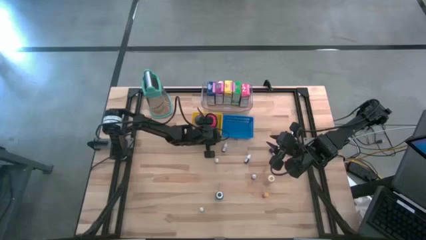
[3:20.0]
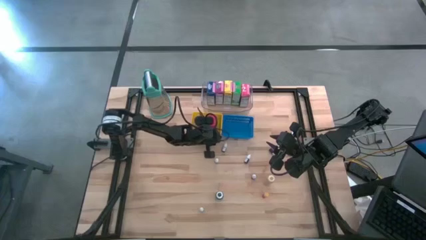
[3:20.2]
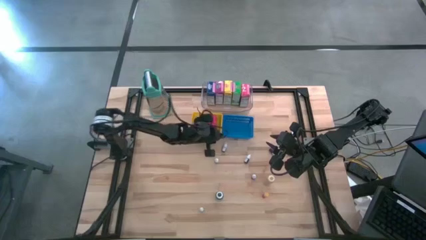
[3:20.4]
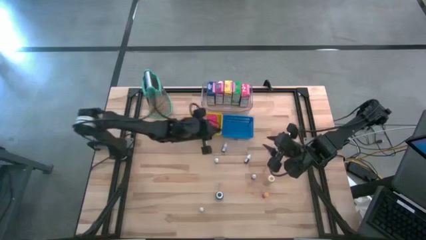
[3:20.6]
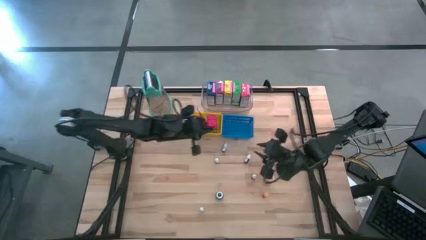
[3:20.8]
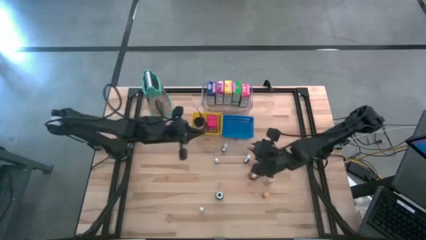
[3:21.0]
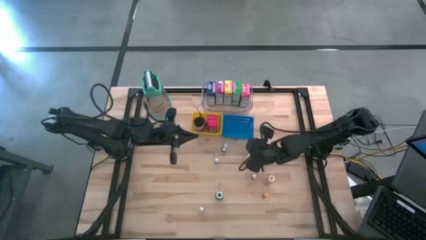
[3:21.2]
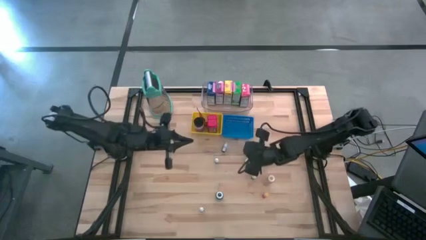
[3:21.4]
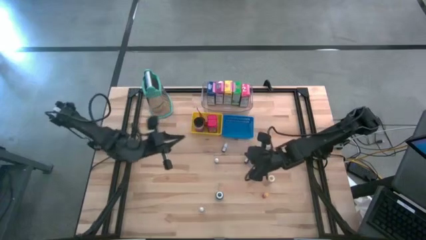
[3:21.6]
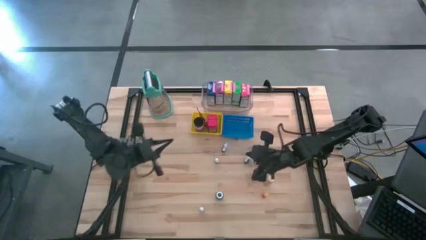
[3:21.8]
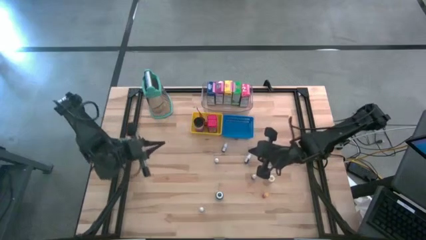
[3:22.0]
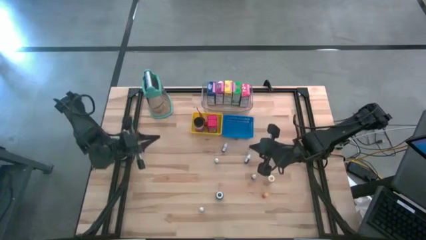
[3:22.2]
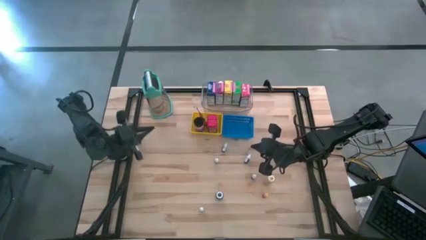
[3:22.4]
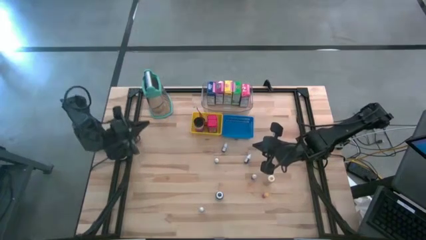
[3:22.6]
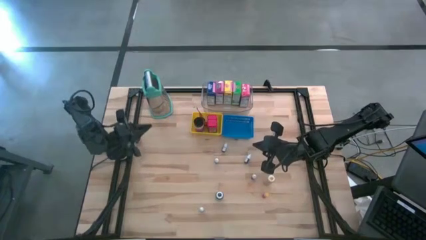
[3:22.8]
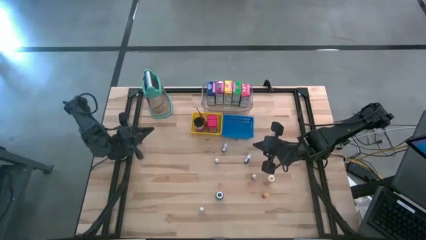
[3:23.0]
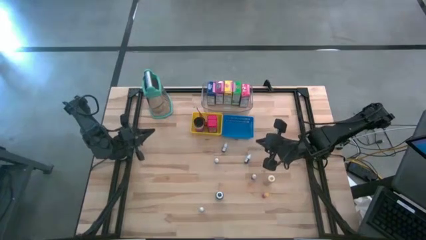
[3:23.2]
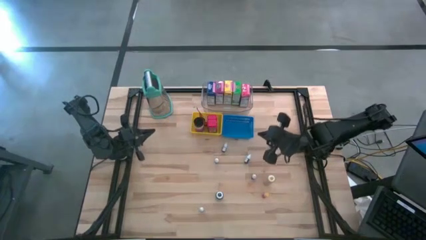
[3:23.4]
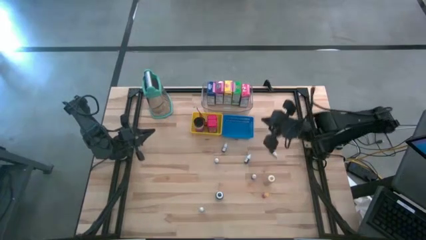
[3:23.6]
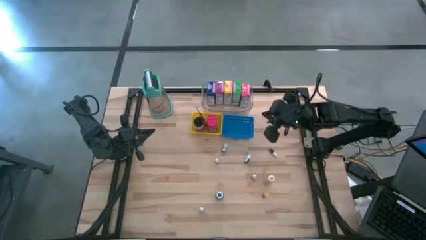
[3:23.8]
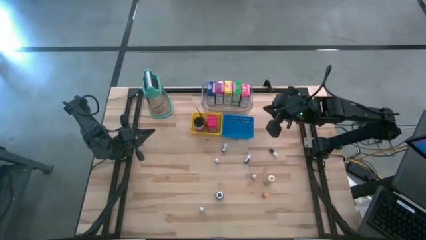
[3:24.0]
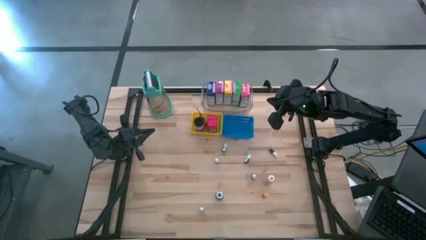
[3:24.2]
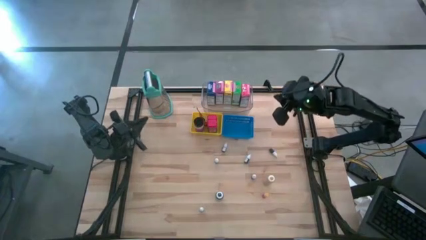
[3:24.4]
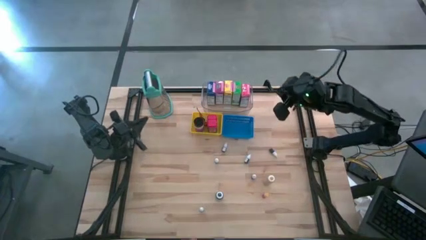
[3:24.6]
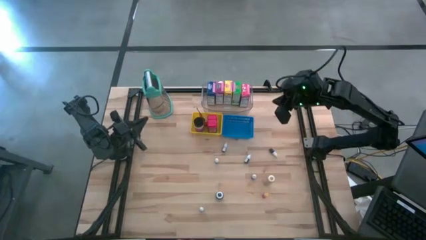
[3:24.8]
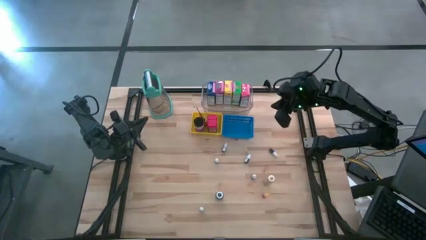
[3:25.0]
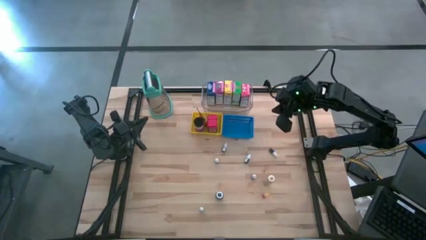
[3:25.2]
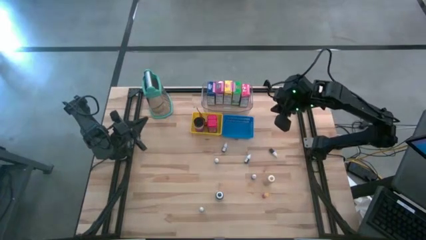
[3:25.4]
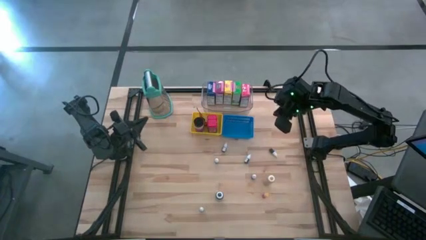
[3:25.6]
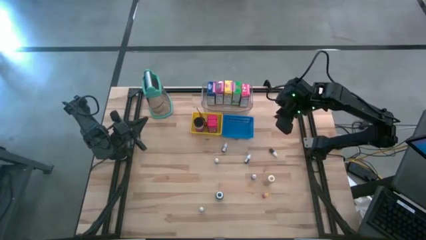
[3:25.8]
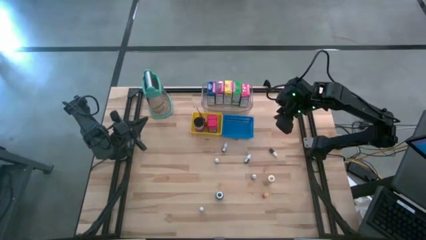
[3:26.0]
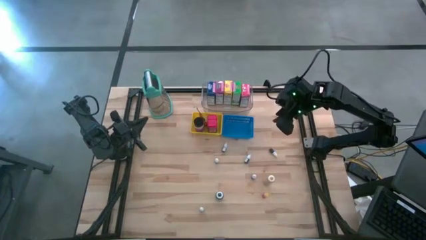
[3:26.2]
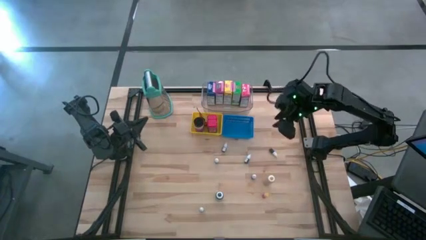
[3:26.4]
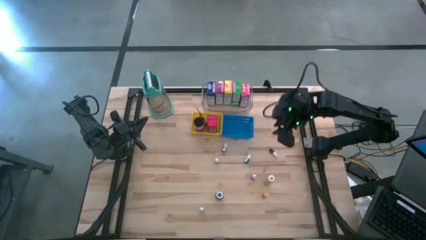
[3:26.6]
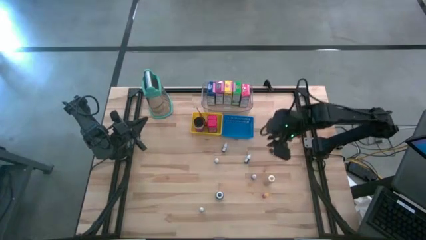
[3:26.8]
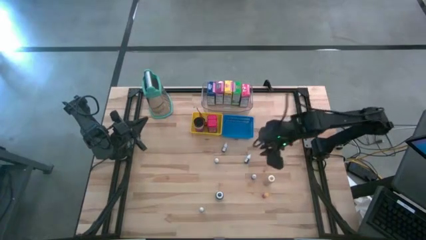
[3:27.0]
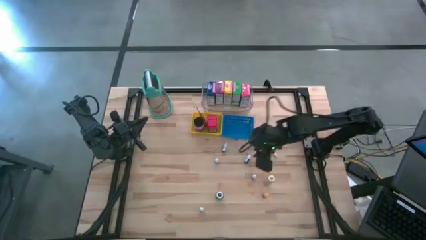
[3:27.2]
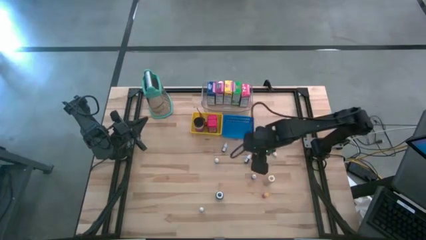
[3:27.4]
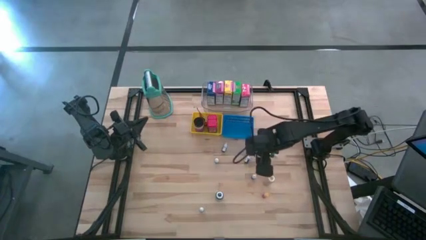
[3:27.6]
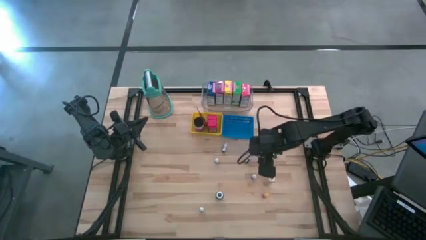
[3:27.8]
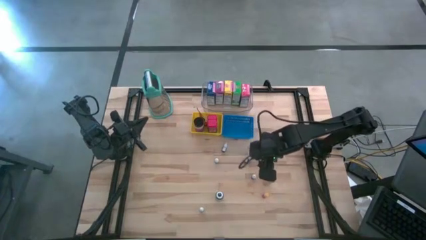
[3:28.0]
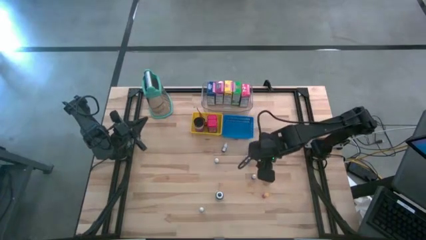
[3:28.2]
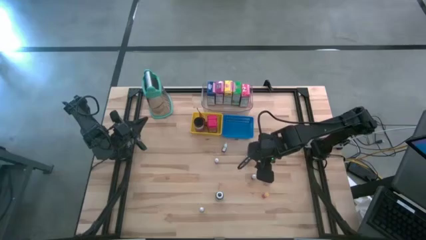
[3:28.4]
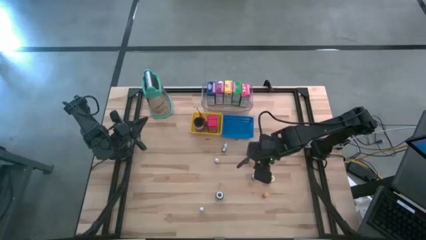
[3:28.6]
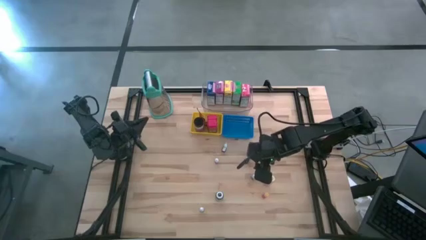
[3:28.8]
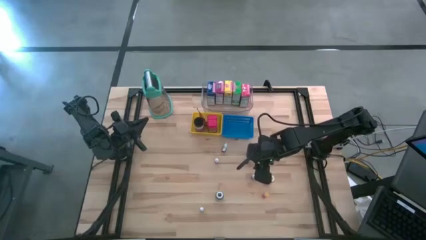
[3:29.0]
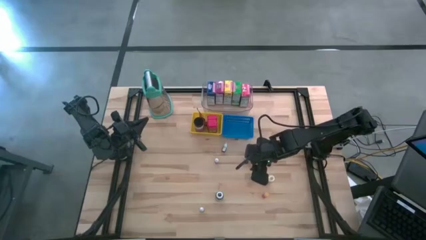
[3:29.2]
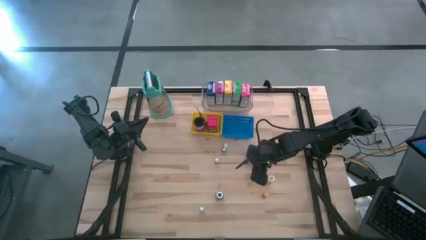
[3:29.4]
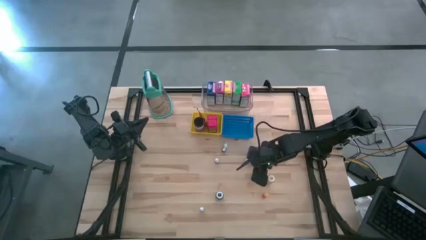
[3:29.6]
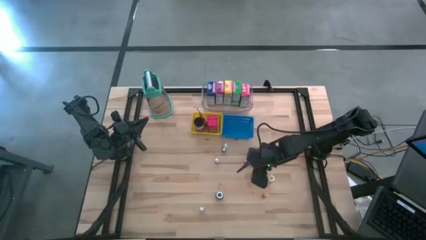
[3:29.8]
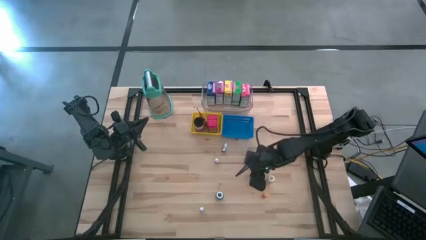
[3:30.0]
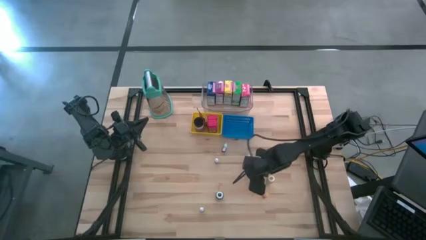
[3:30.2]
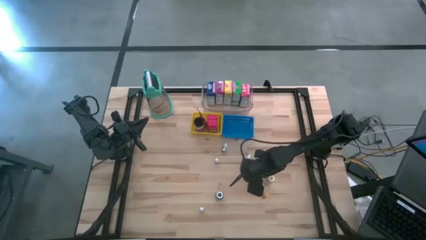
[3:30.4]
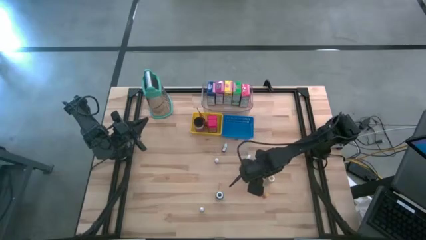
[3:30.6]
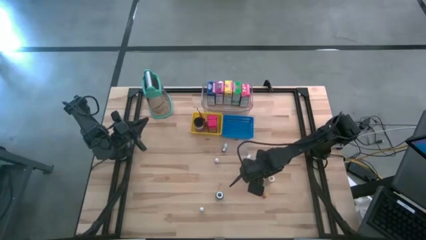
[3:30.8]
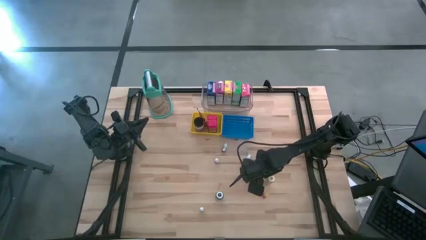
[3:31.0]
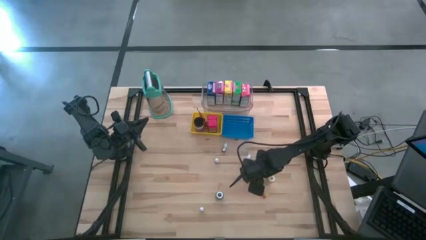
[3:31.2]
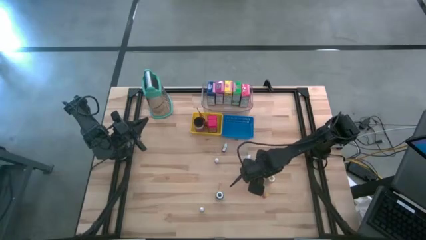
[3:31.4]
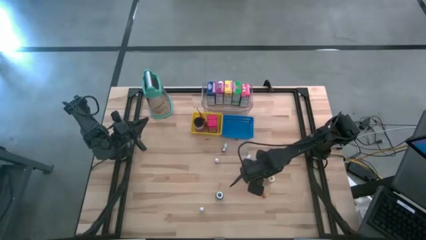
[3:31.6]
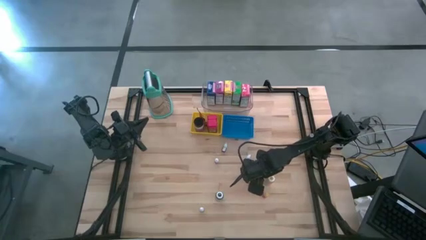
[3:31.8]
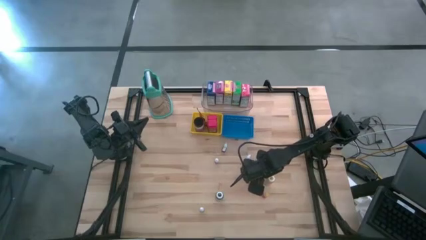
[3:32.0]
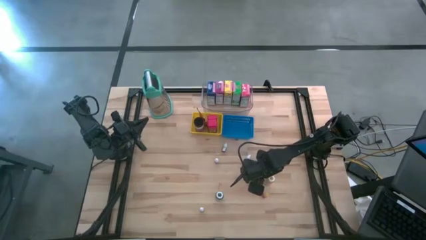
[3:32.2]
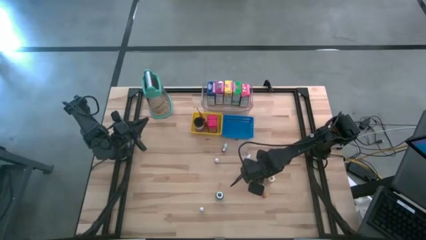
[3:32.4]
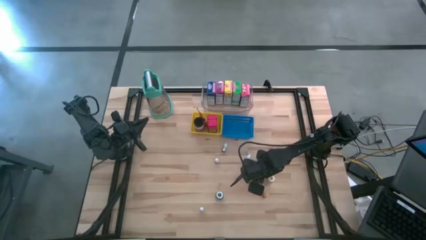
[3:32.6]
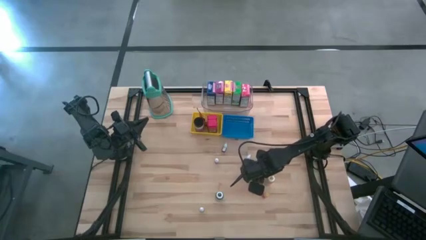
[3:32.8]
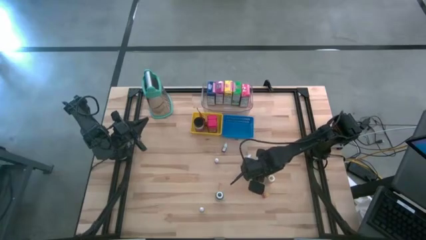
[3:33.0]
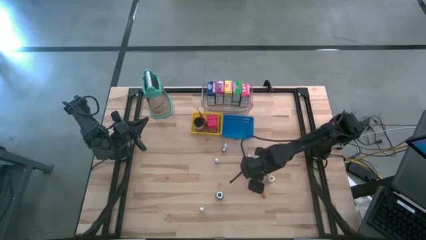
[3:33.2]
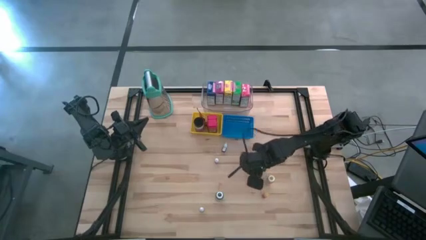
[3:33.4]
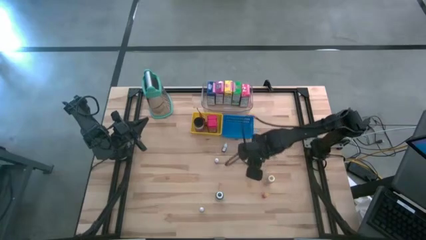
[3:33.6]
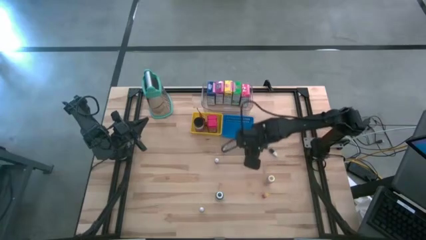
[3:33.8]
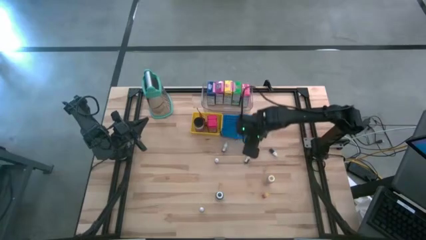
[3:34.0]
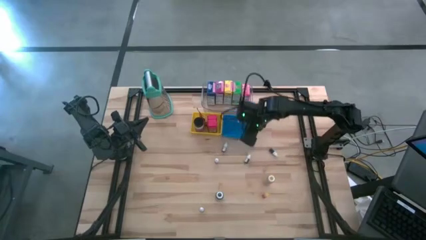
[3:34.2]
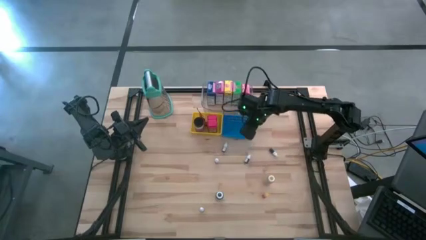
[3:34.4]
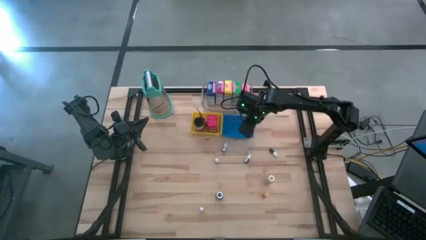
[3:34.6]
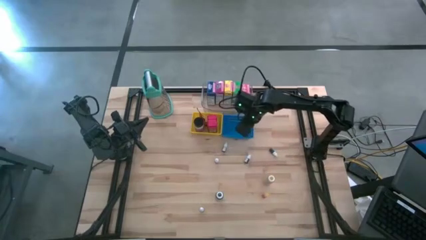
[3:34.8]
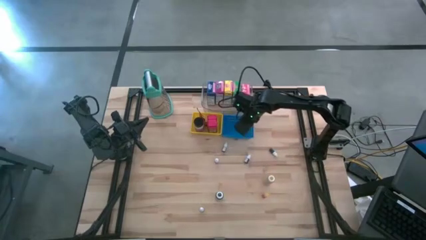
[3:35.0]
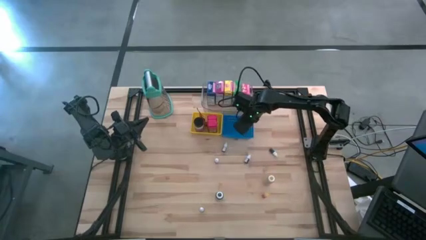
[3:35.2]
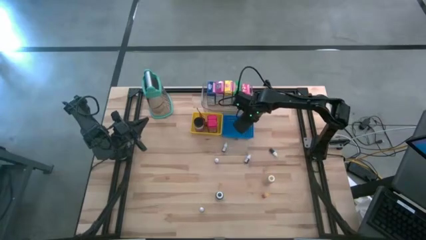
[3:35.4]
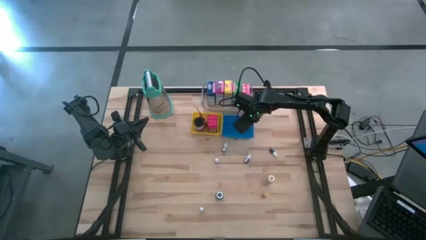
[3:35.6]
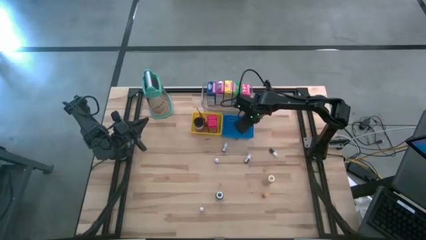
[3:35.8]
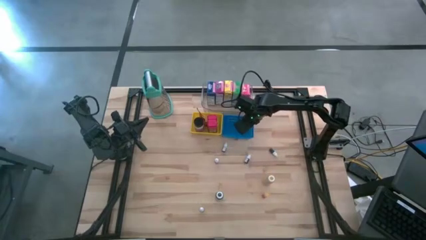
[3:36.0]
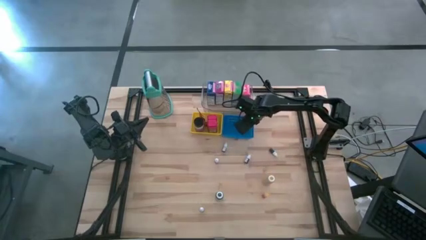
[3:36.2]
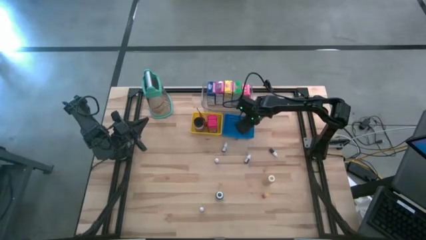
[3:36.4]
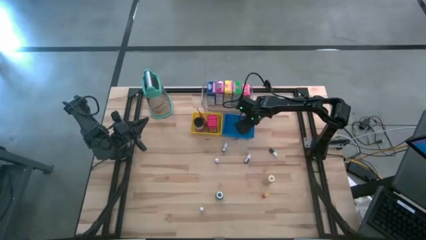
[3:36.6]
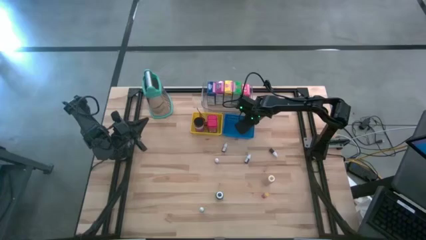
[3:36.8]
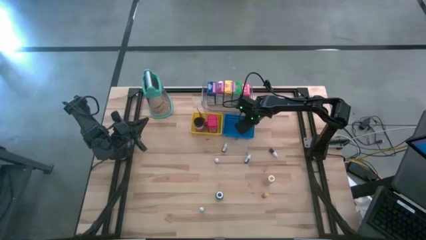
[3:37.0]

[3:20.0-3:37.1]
Task: Pick & Place Kitchen Items
Put the small black food coloring bottle into the blue bin
